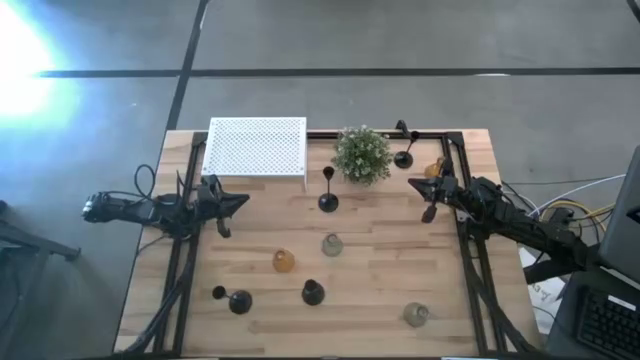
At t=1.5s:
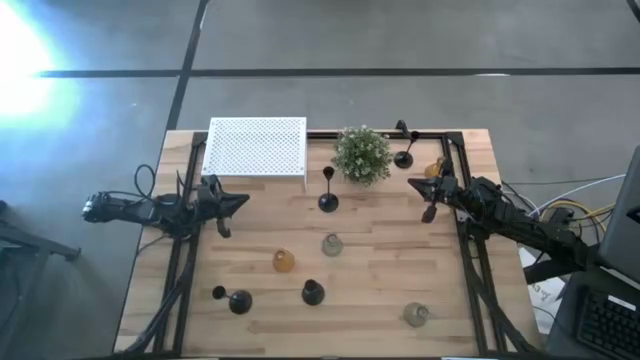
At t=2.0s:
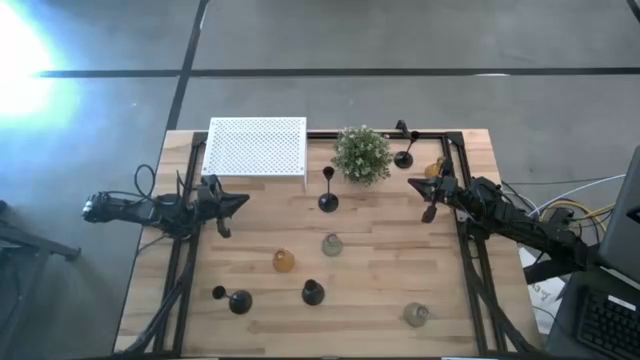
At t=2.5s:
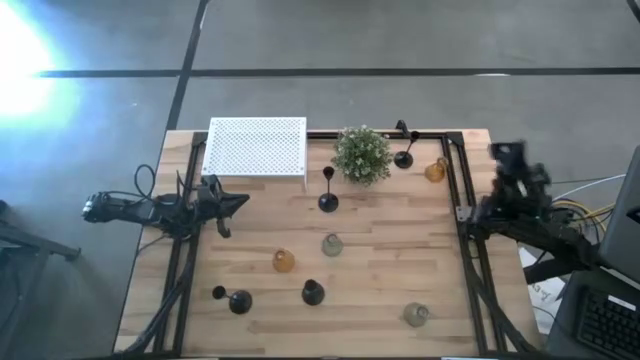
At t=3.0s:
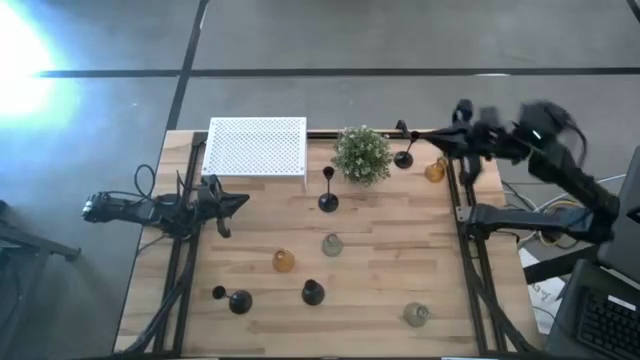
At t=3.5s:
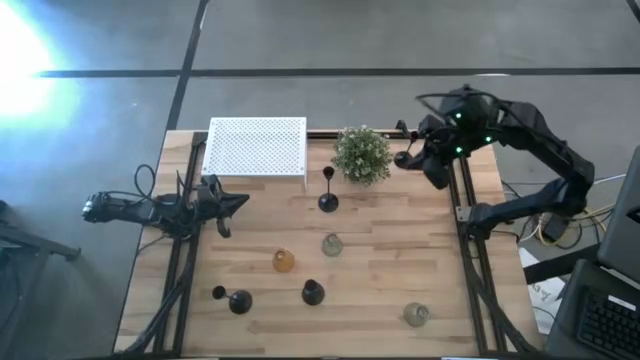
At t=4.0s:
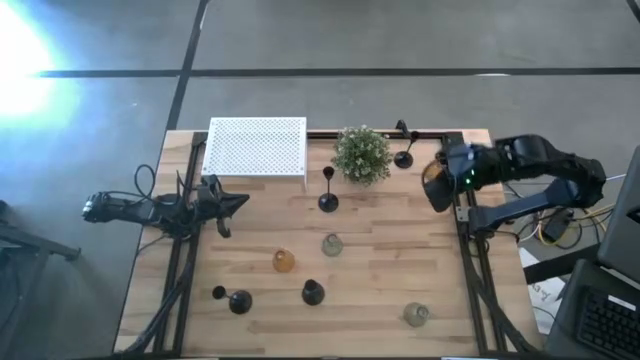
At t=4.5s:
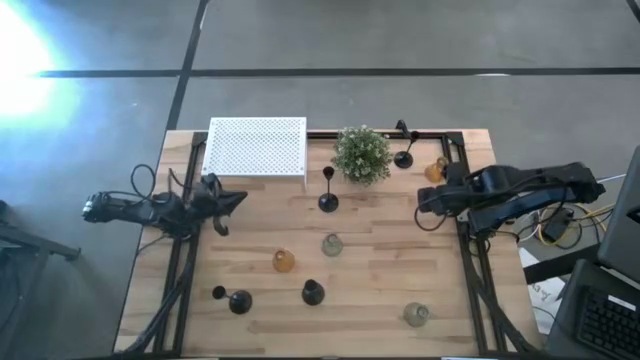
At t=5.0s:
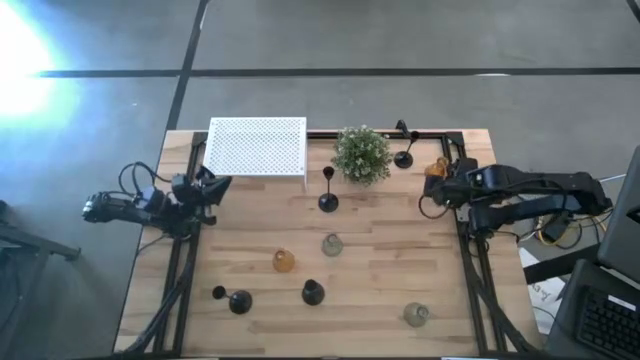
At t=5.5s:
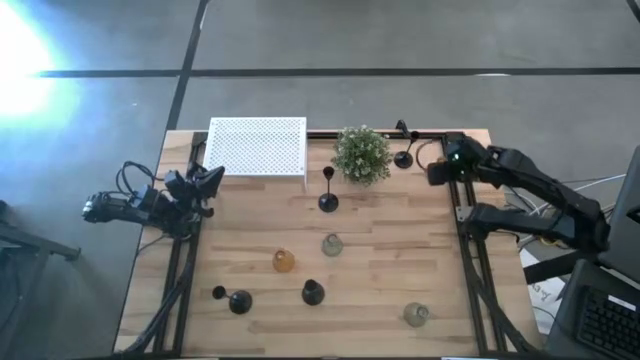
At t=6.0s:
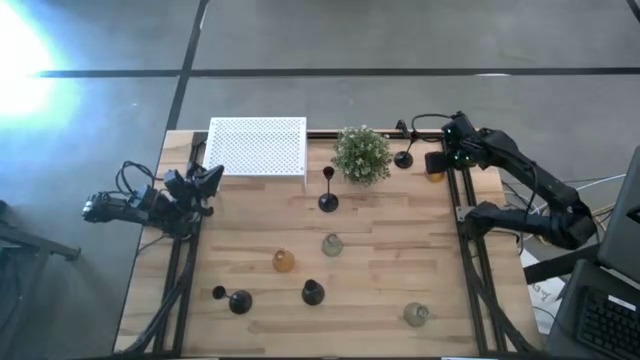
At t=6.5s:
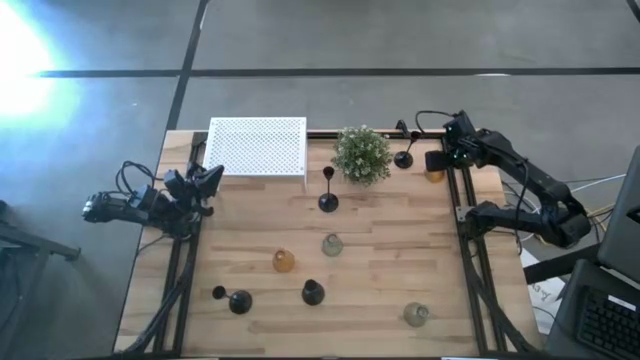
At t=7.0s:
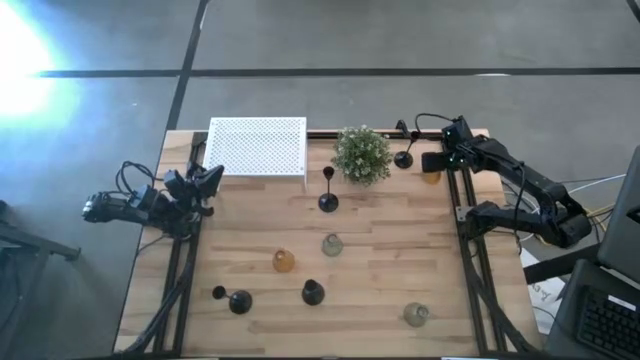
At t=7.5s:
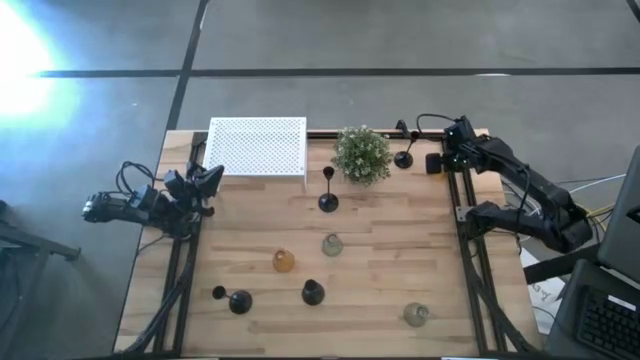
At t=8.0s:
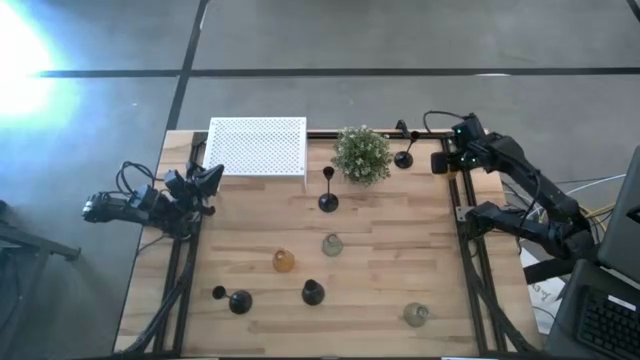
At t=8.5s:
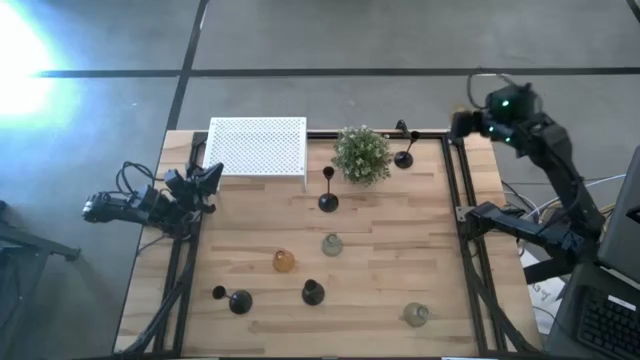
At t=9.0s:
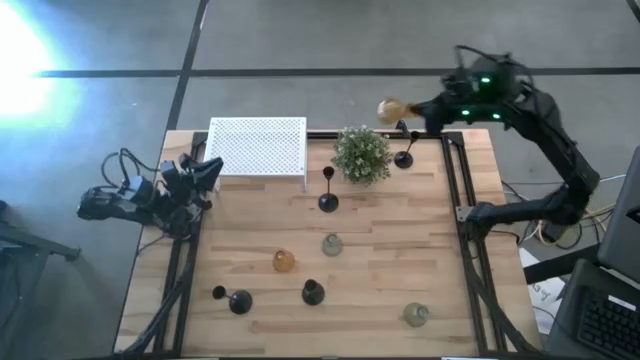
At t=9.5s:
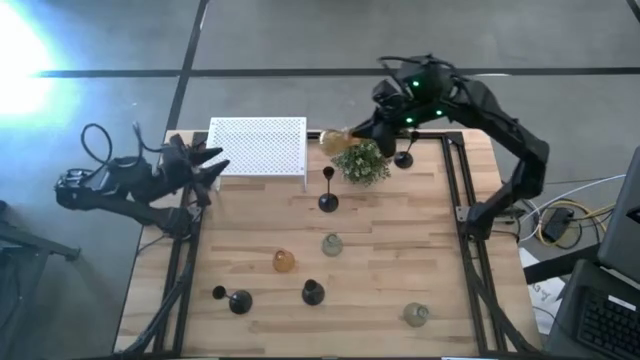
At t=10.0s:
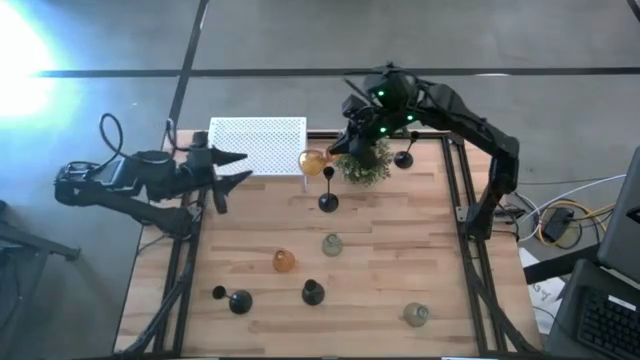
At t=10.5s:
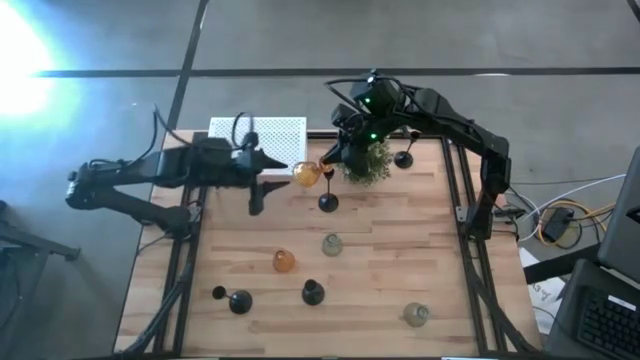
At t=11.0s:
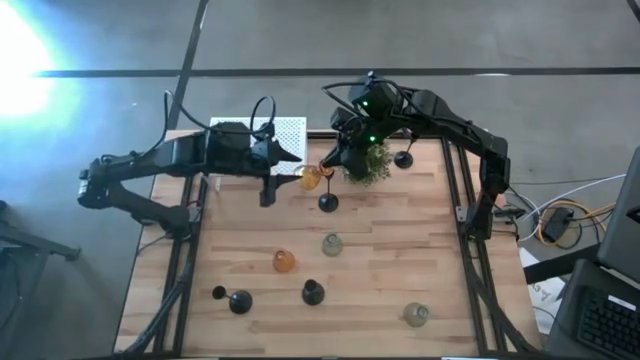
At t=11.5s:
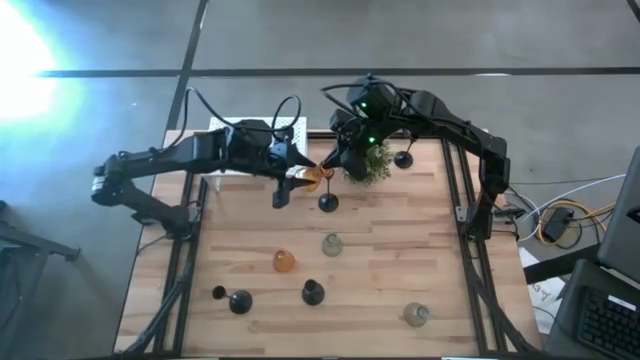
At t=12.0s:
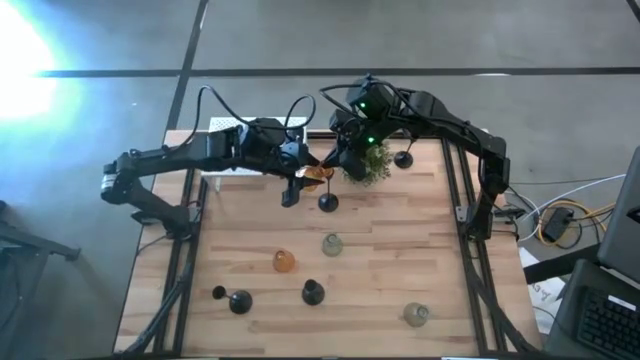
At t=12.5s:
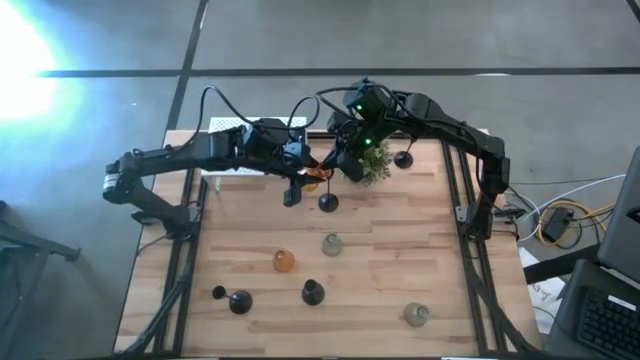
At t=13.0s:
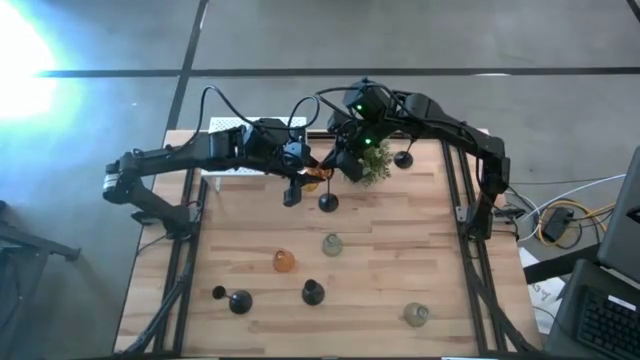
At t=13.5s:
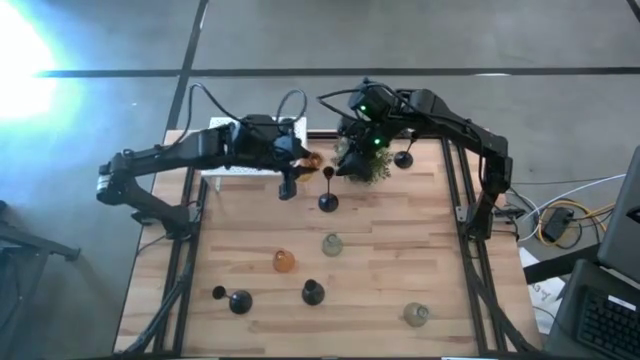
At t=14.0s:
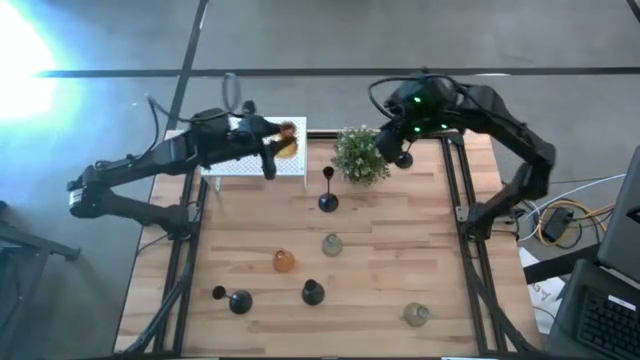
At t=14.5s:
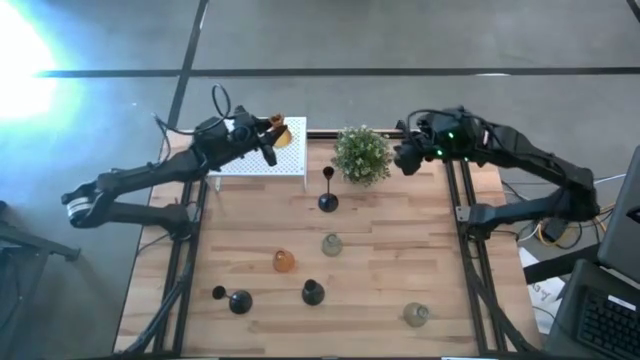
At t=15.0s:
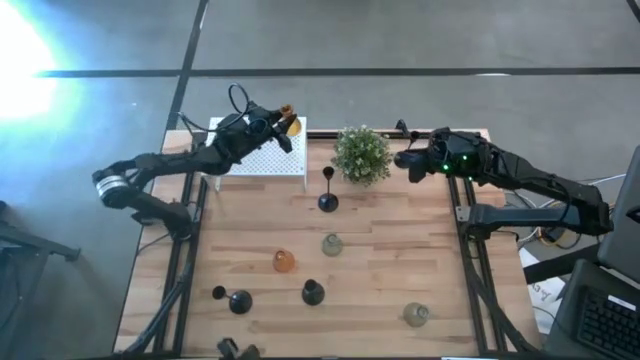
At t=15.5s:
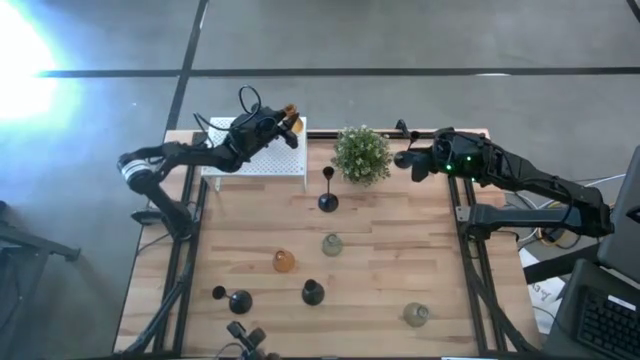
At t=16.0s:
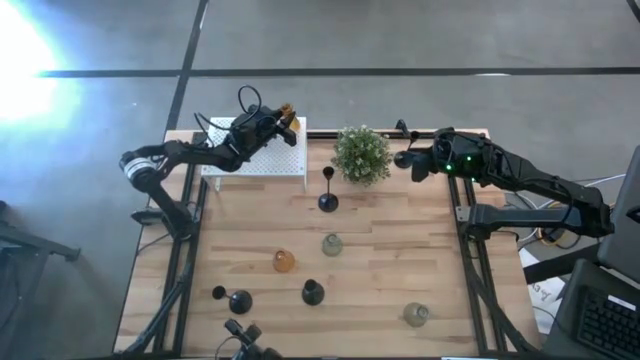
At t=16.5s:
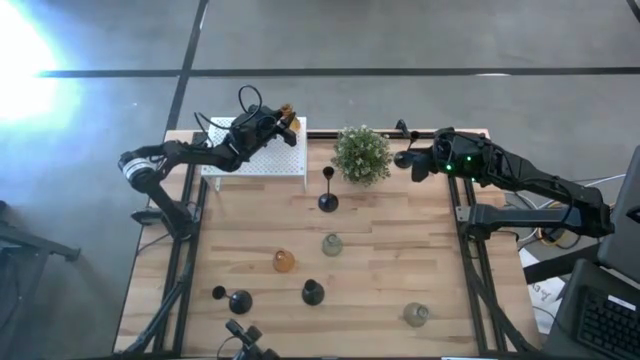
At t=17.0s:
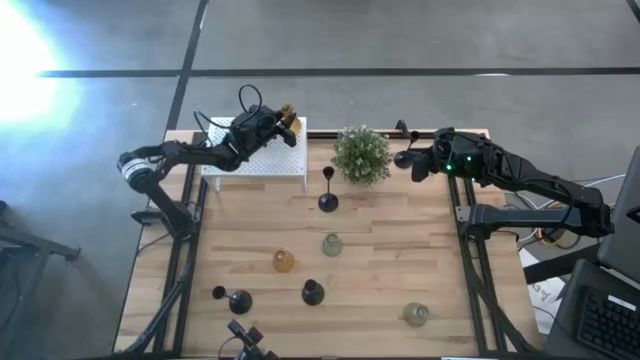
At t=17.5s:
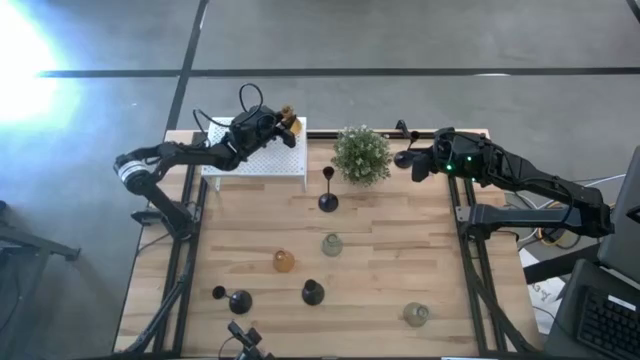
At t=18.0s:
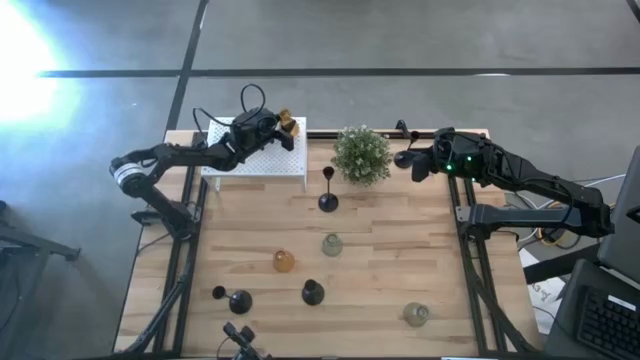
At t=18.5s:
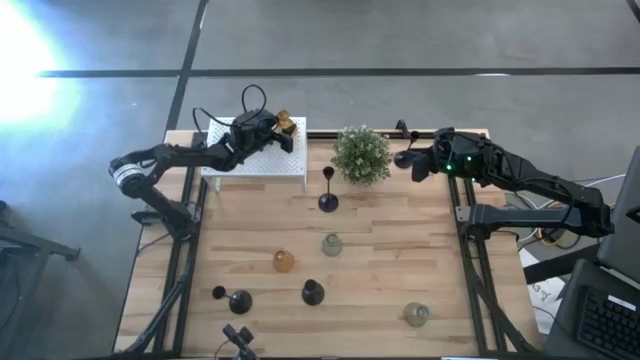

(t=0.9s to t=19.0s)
Task: Pick & Place candle stick holders
Put the top yellow glass candle holder on the shelf

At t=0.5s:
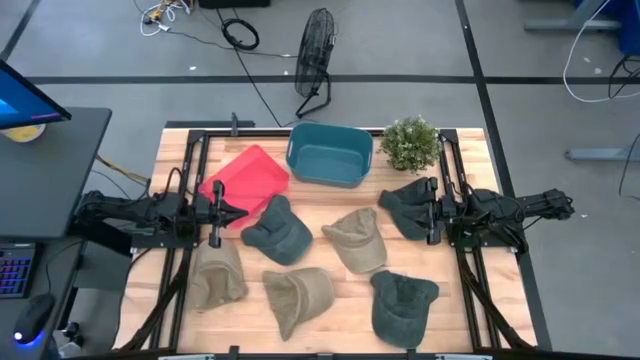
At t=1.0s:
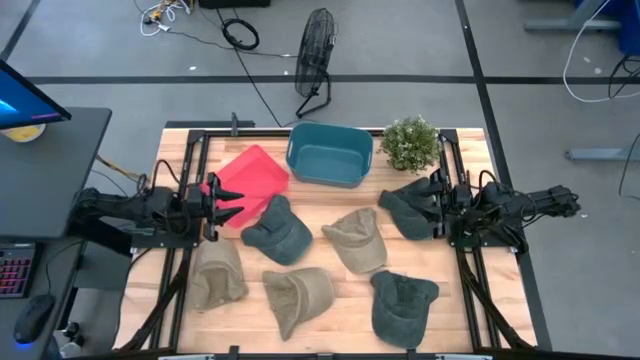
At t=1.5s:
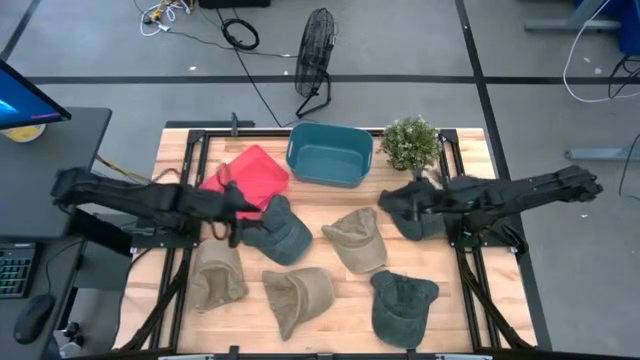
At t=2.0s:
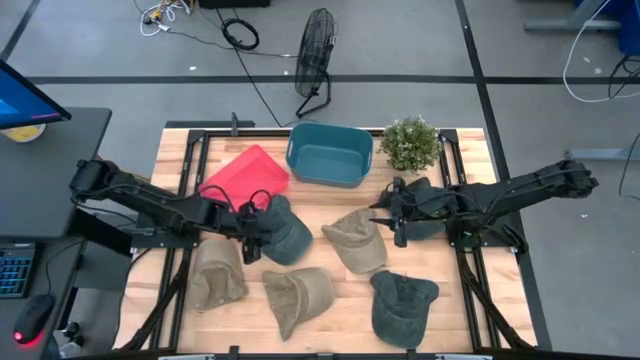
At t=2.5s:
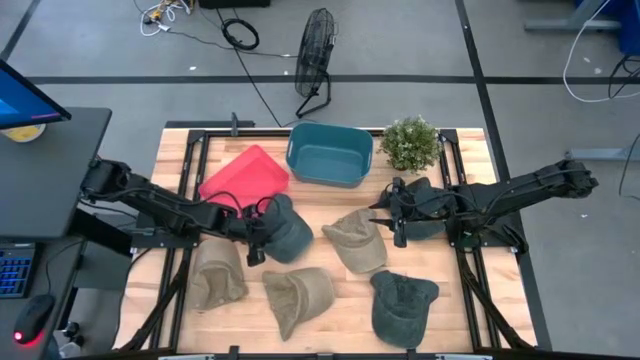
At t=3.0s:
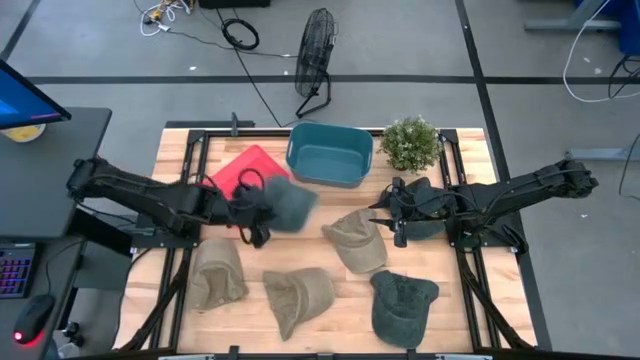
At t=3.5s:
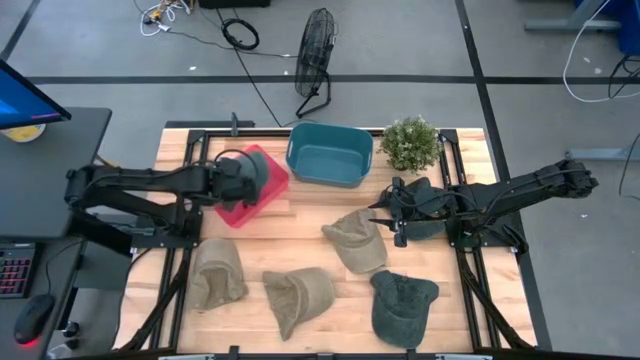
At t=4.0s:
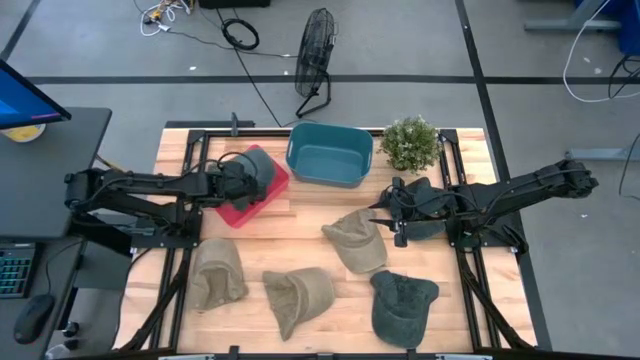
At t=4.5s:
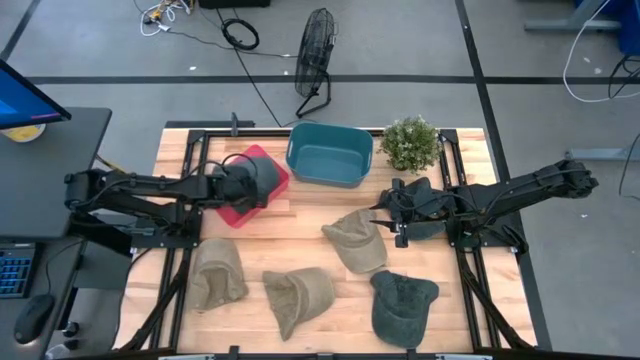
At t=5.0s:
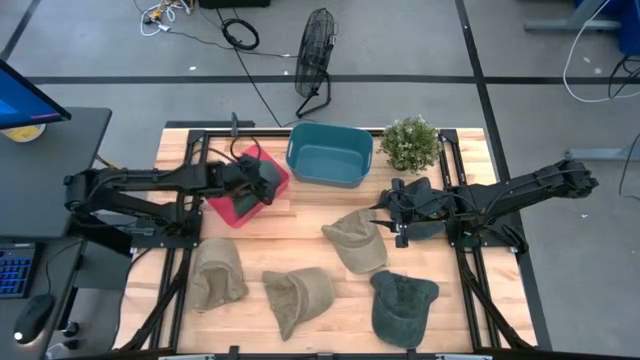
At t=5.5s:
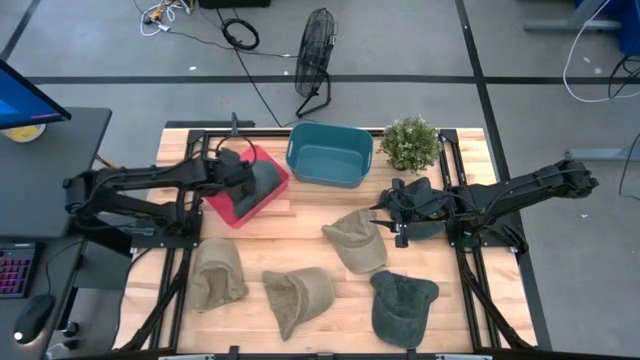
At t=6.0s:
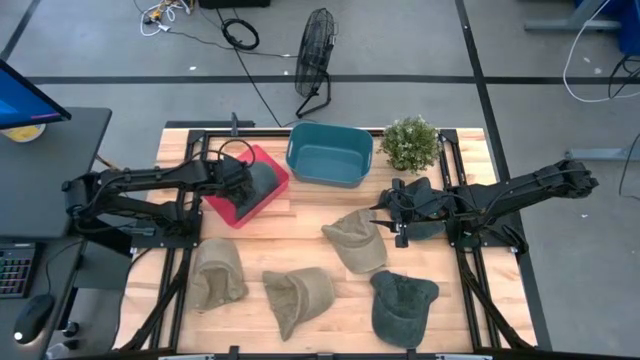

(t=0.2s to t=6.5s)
Task: Pick & Place hat
Put the top left dark blue cap into the pink bin
